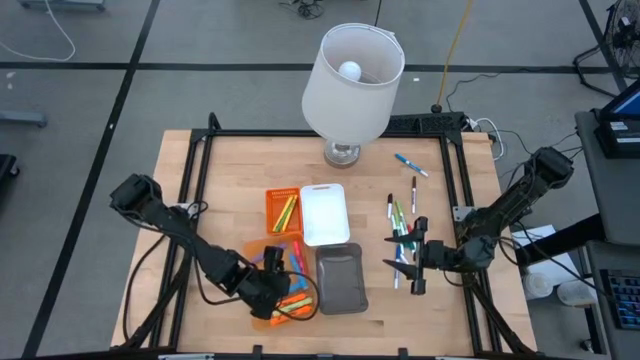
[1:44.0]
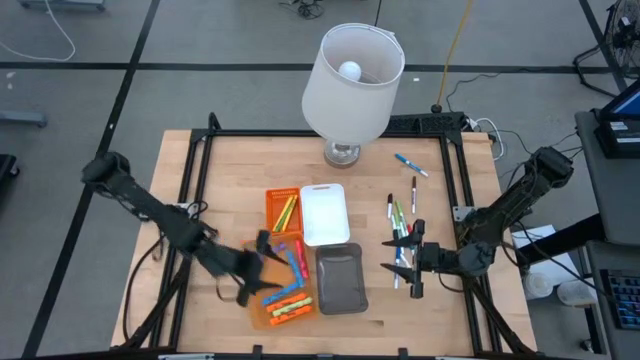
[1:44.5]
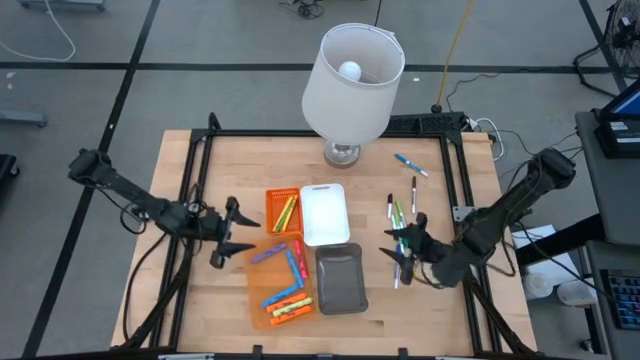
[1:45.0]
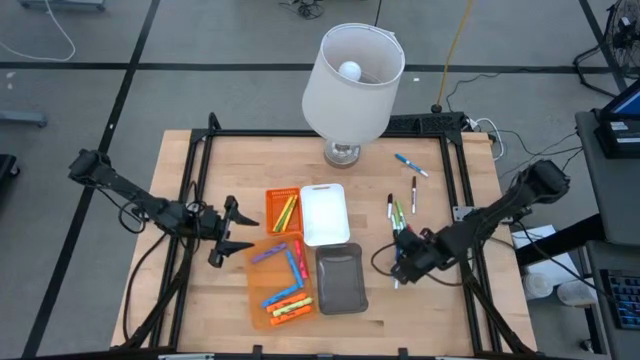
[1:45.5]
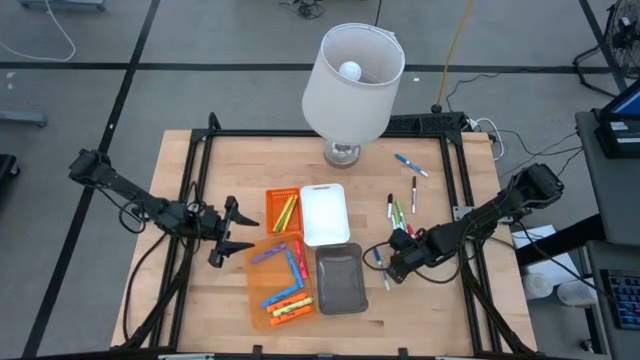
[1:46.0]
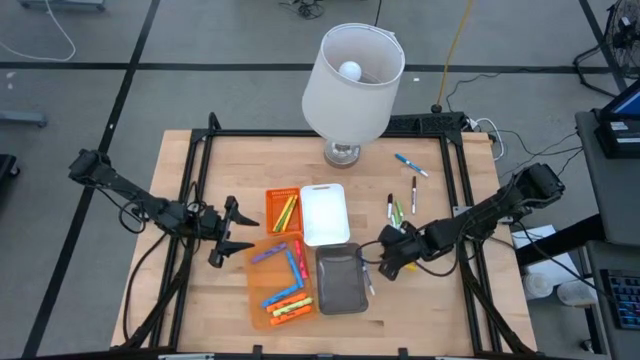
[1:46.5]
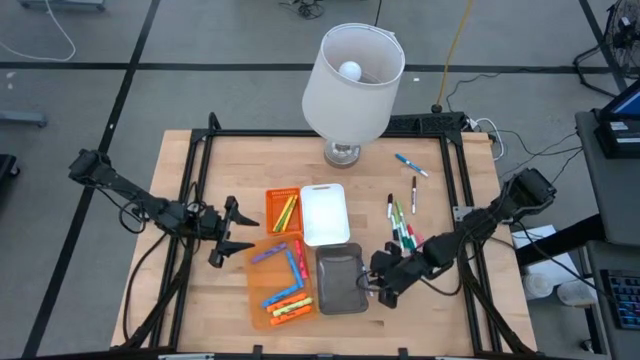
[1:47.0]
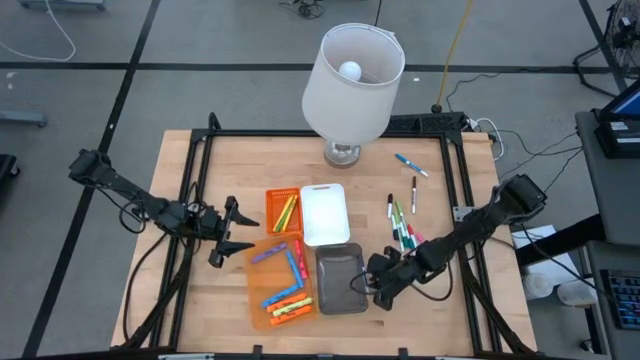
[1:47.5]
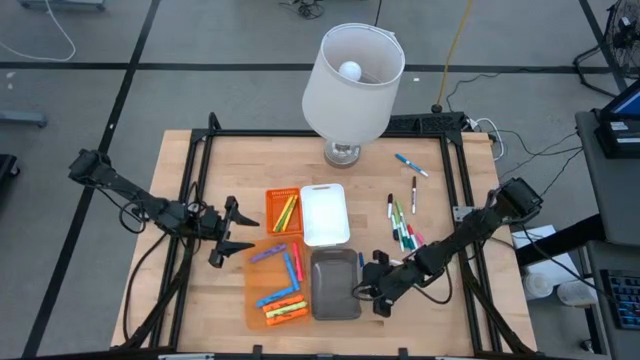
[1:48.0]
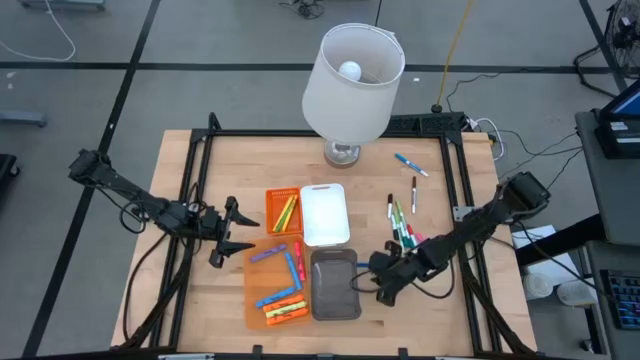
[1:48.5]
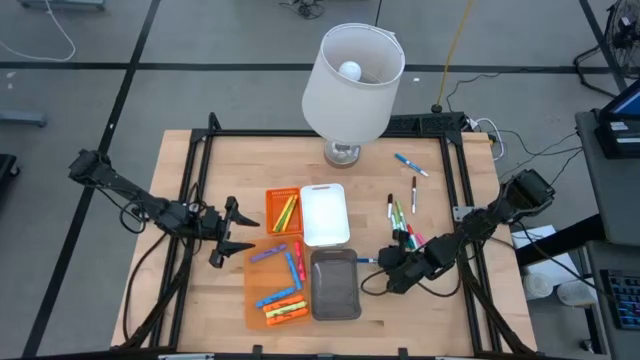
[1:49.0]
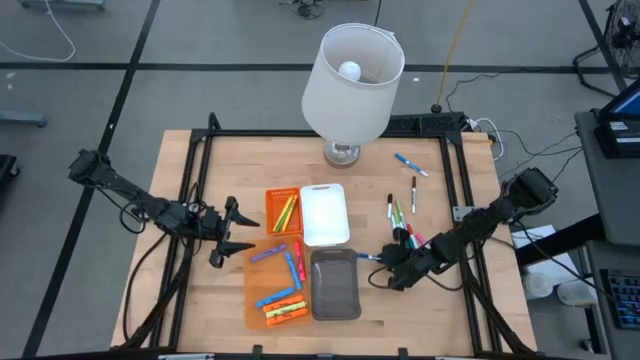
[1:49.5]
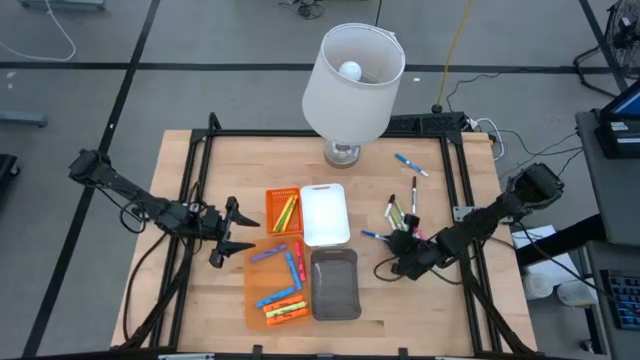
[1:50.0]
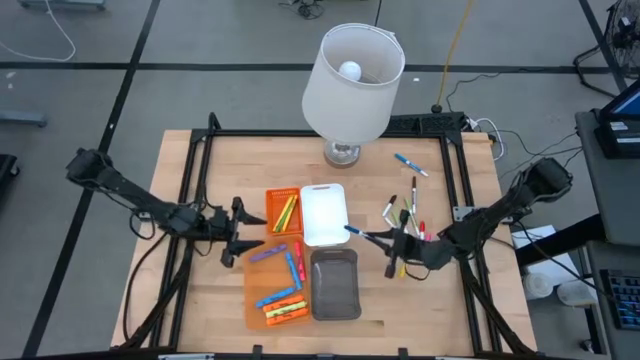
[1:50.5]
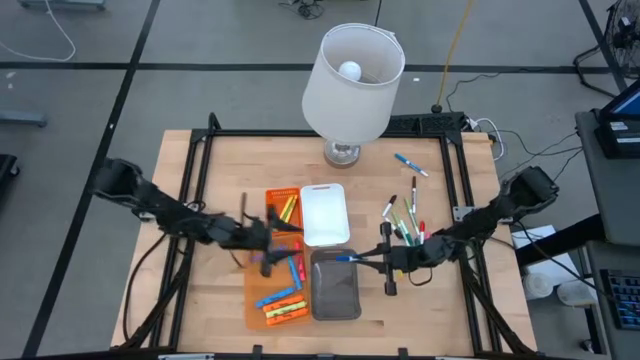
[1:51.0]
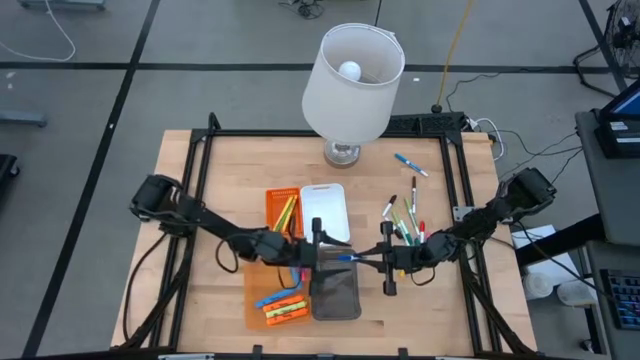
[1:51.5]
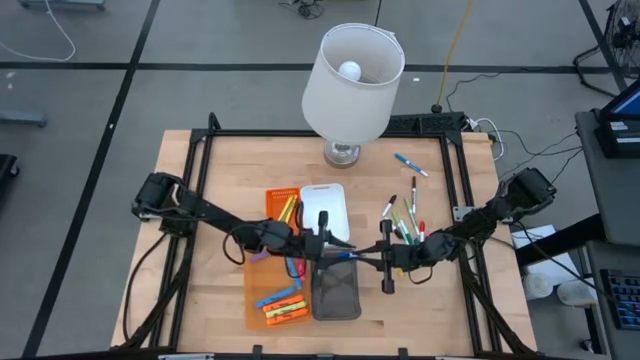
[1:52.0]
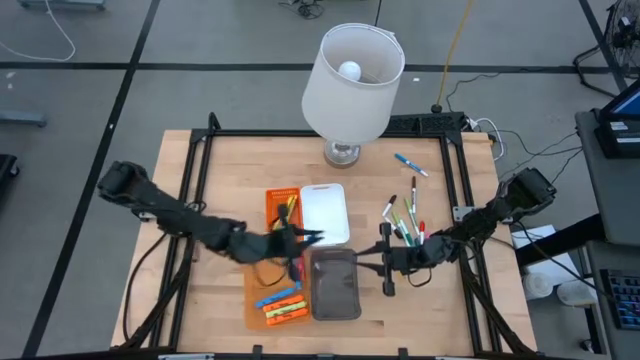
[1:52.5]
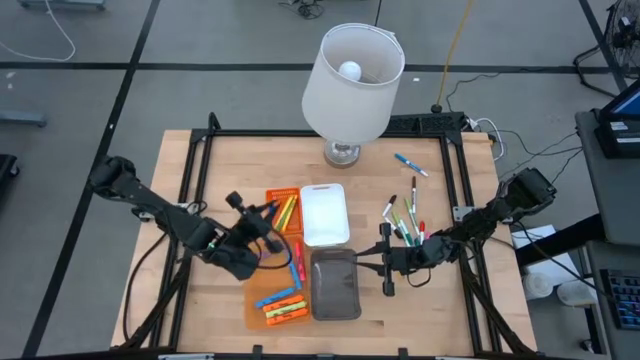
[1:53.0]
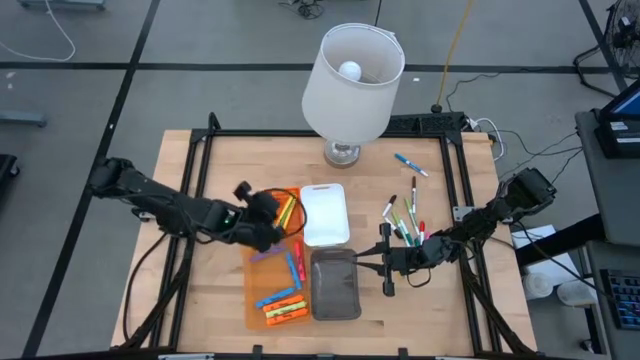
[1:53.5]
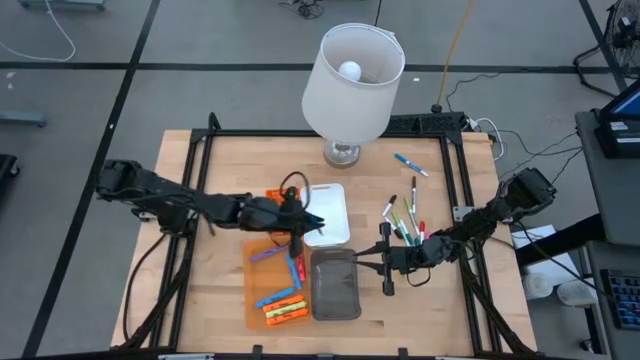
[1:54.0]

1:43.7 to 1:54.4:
Task: Pick & Place Markers
Put the blue marker pen into the white bin

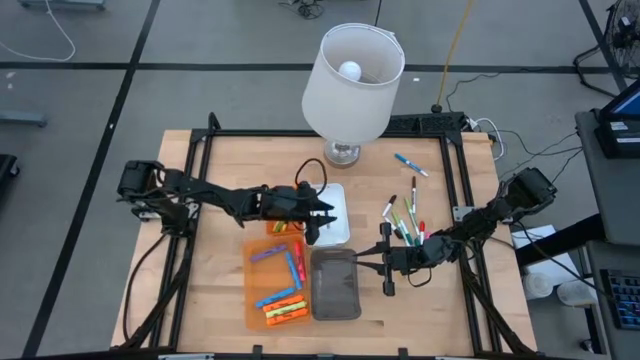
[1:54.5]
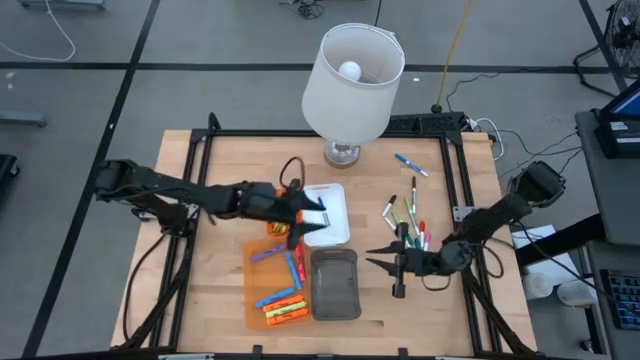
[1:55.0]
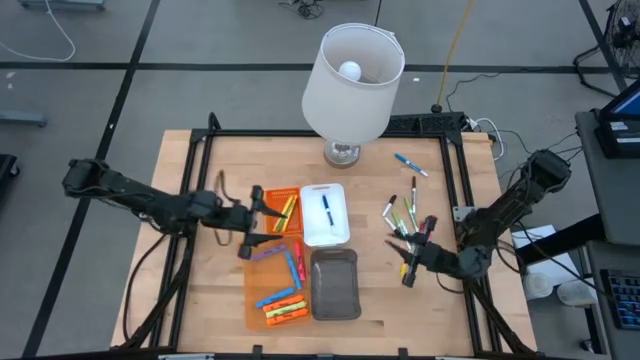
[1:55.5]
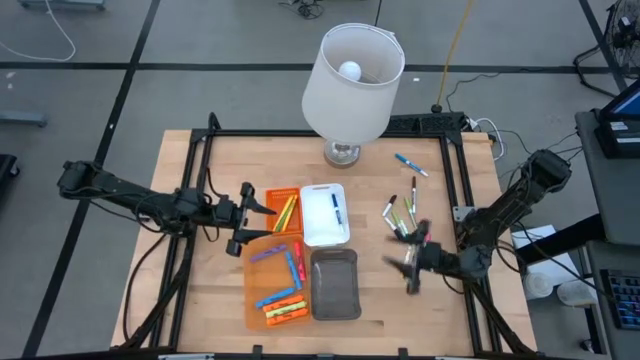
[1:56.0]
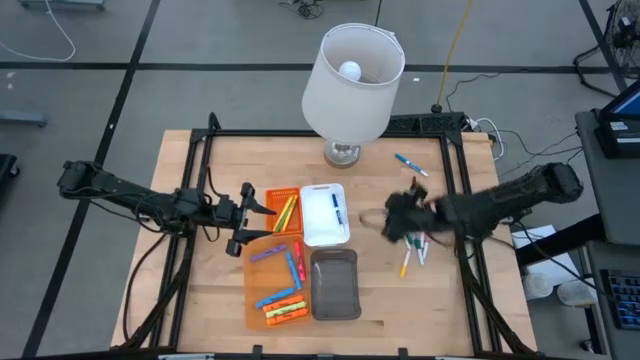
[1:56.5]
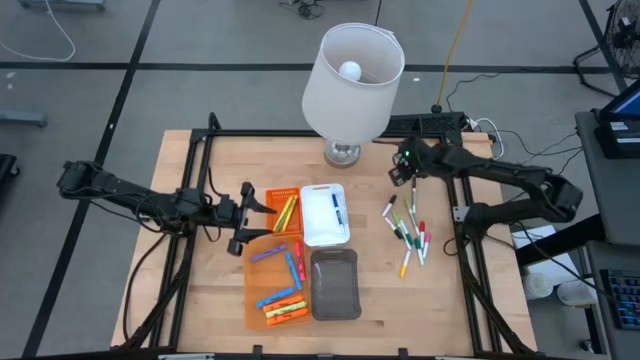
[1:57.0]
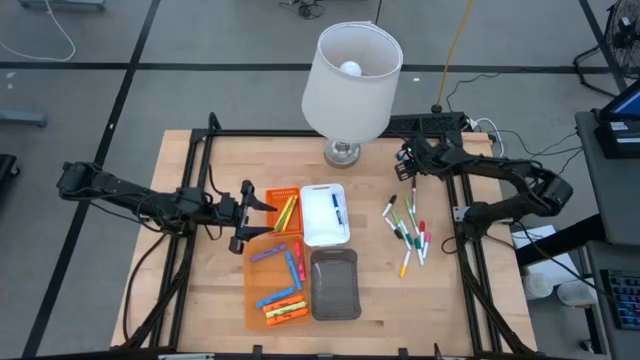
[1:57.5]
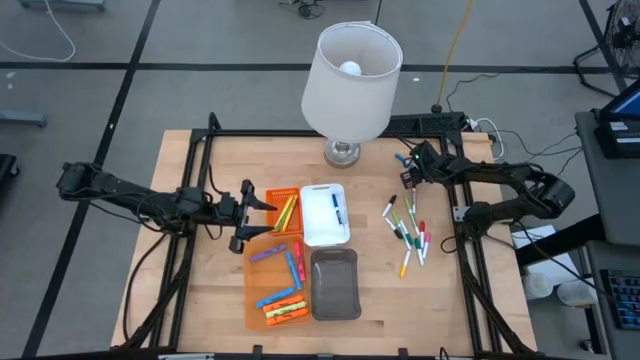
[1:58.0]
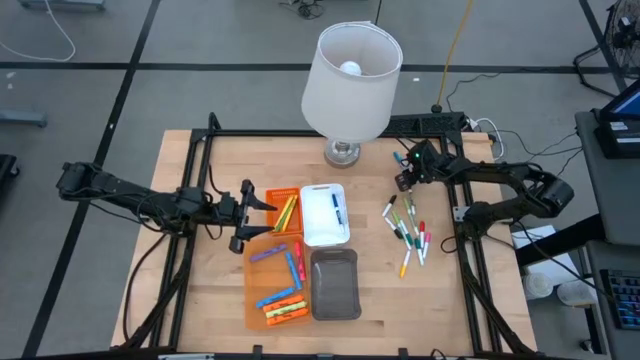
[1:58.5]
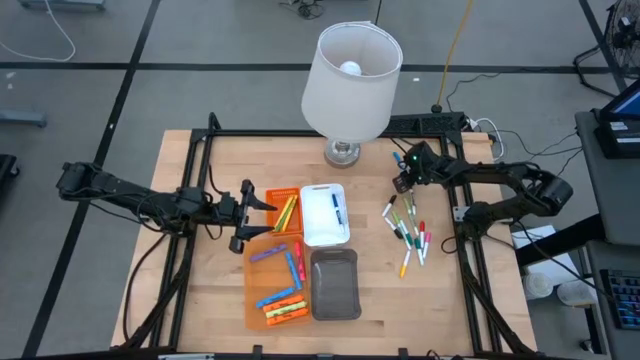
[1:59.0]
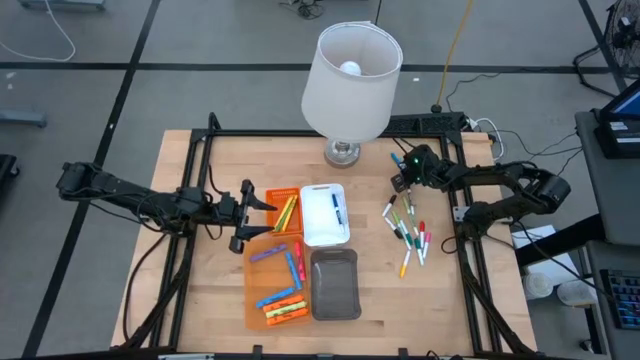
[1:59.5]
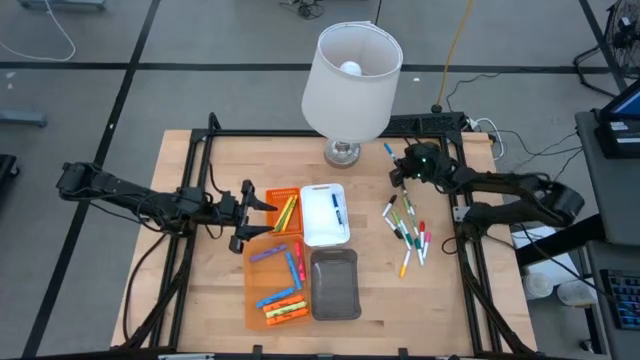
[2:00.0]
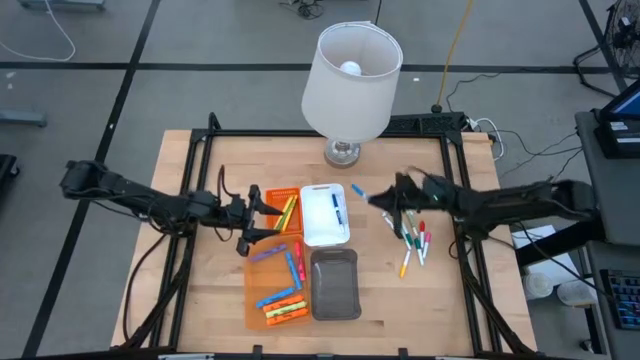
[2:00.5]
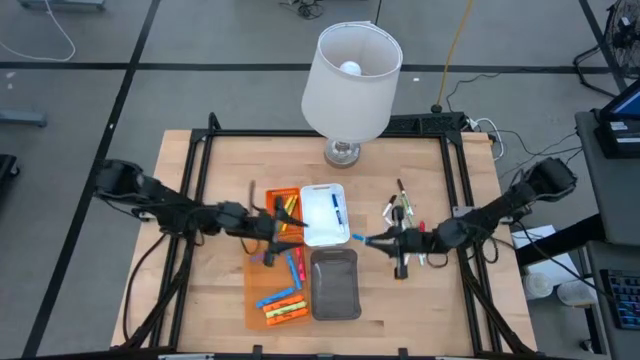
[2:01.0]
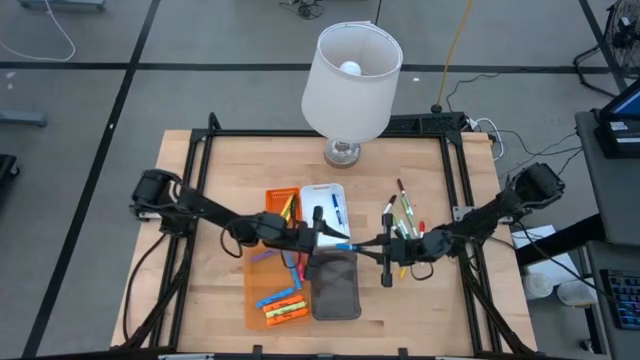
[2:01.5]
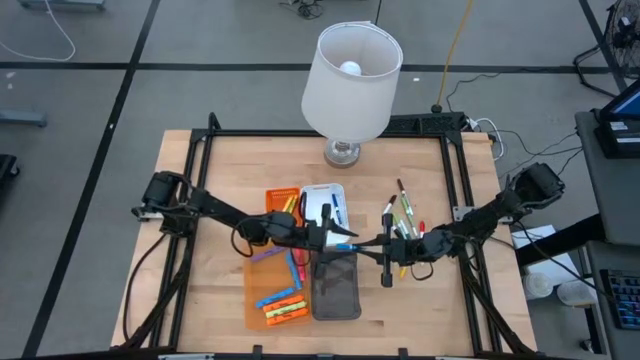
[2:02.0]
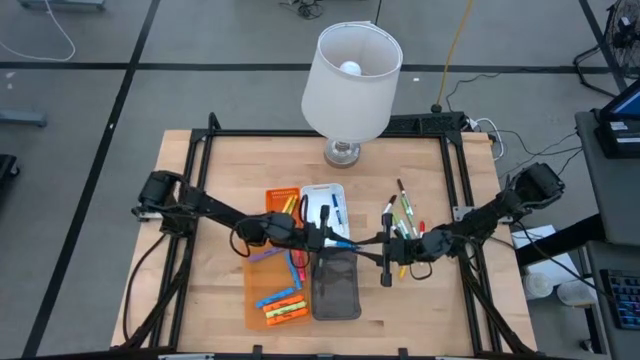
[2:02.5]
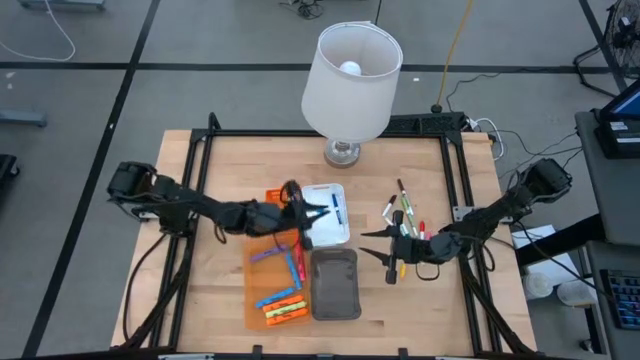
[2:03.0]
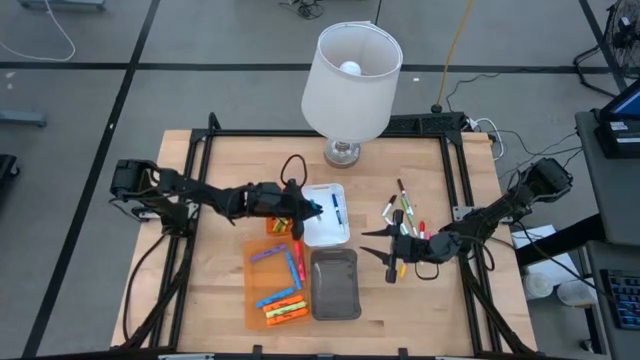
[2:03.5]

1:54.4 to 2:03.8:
Put the light blue marker pen into the white bin
